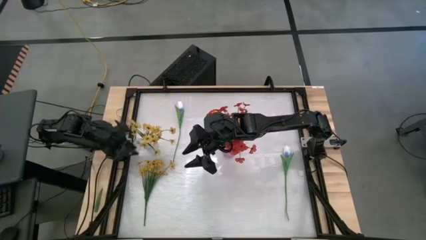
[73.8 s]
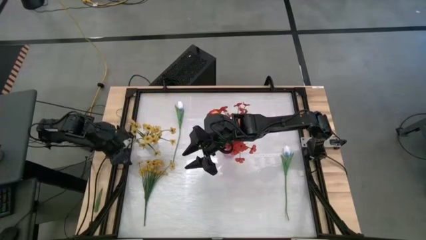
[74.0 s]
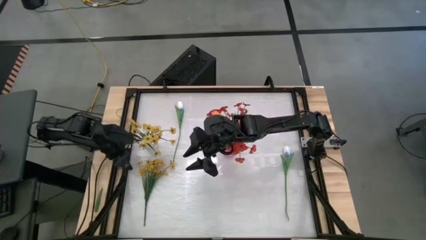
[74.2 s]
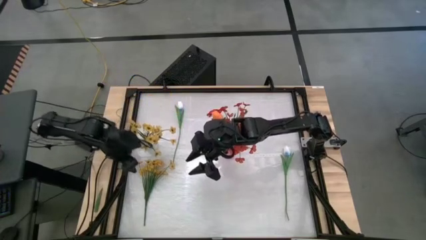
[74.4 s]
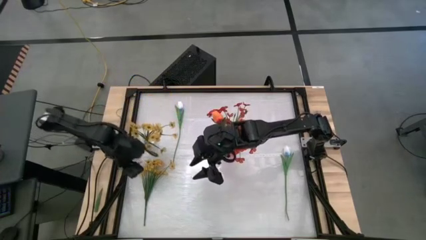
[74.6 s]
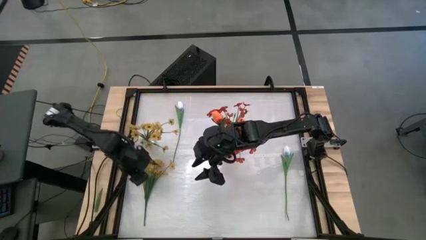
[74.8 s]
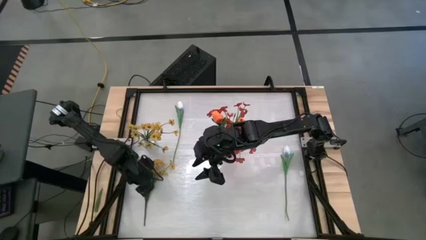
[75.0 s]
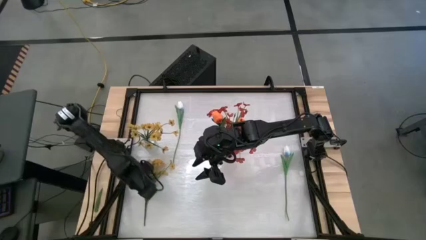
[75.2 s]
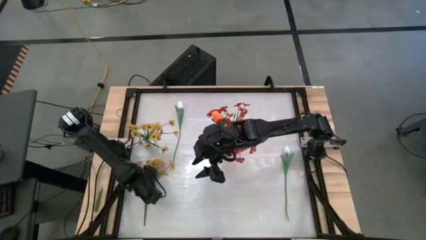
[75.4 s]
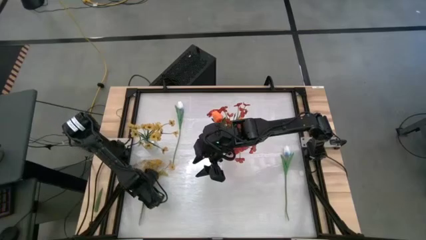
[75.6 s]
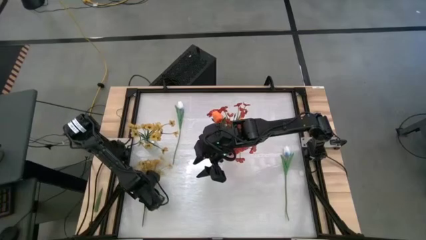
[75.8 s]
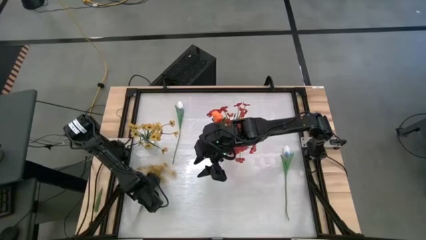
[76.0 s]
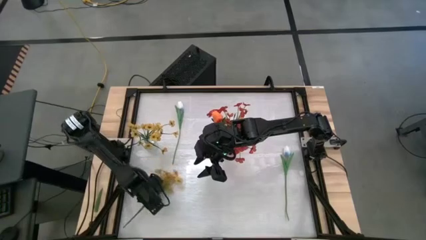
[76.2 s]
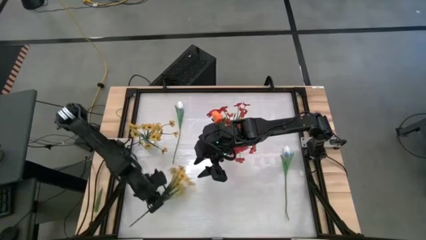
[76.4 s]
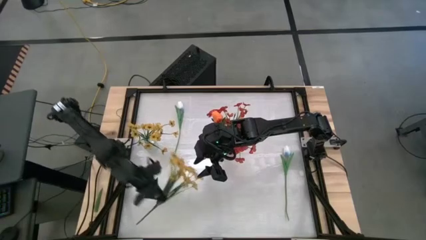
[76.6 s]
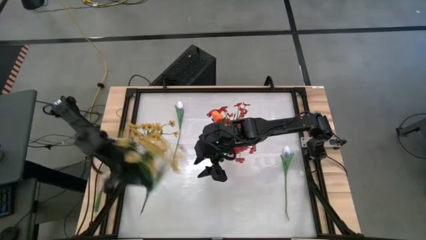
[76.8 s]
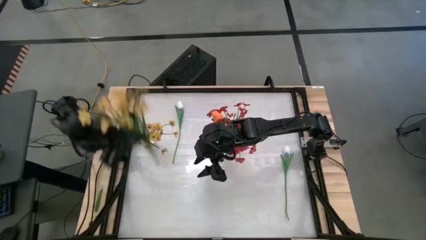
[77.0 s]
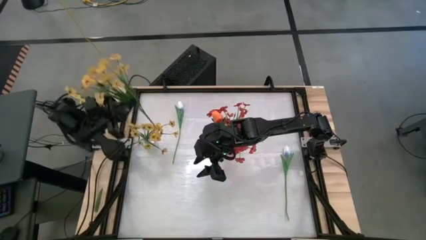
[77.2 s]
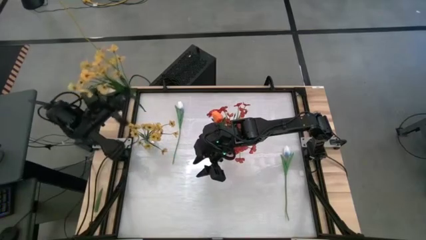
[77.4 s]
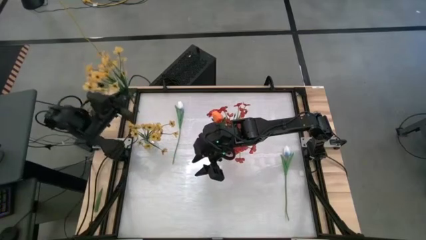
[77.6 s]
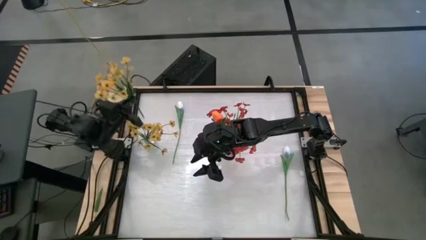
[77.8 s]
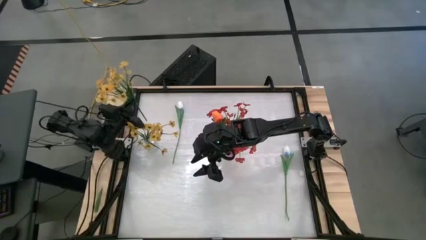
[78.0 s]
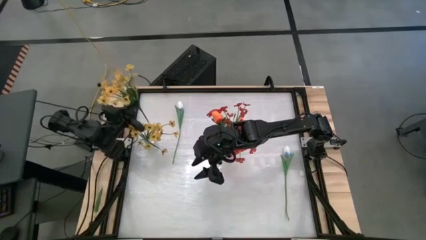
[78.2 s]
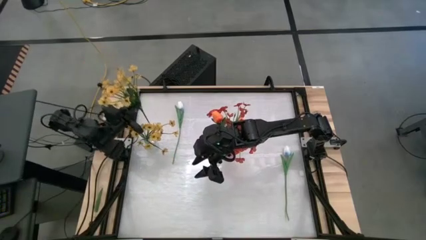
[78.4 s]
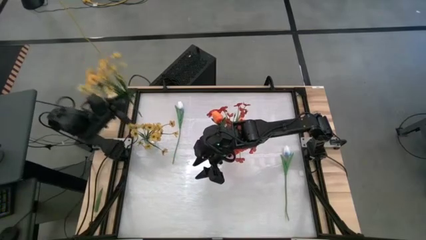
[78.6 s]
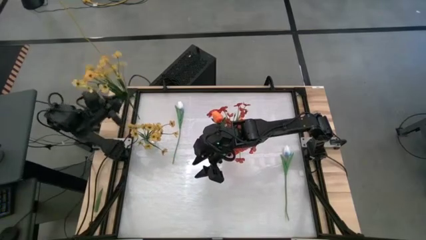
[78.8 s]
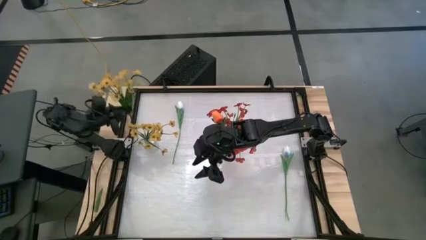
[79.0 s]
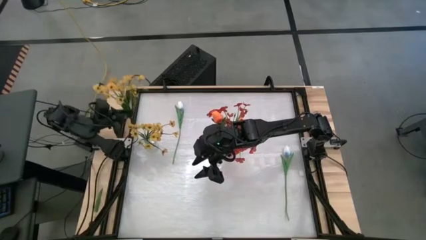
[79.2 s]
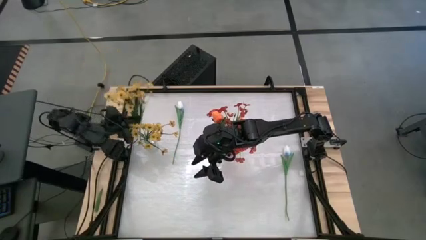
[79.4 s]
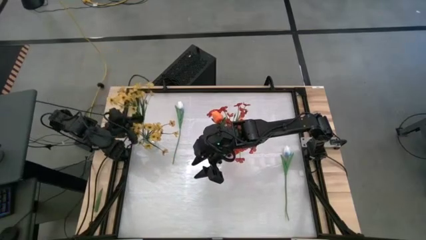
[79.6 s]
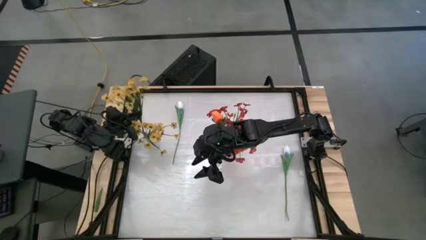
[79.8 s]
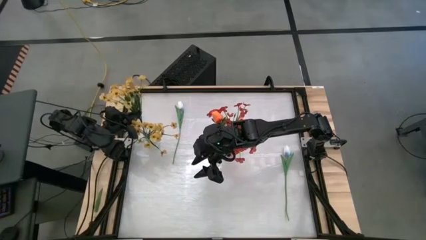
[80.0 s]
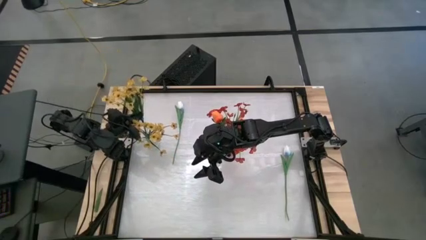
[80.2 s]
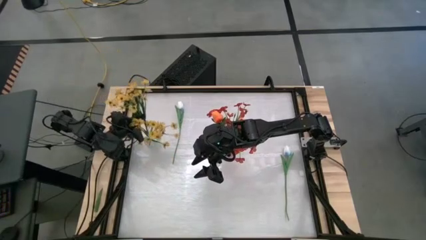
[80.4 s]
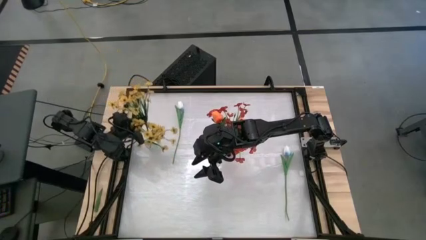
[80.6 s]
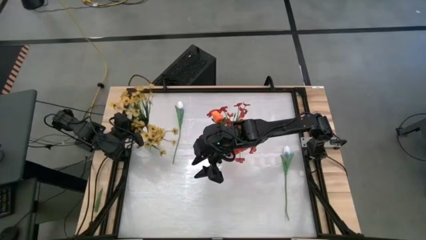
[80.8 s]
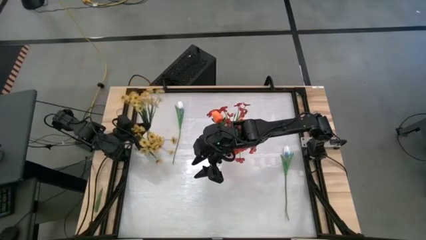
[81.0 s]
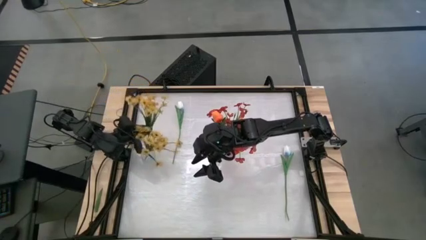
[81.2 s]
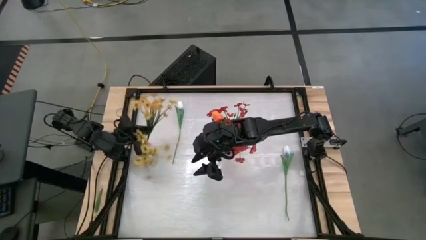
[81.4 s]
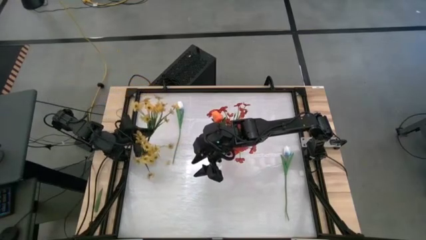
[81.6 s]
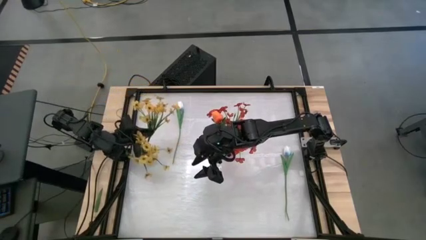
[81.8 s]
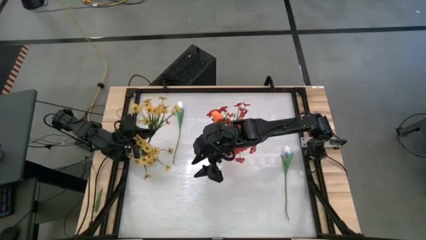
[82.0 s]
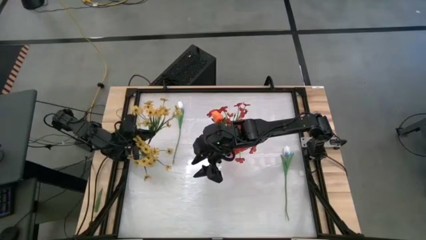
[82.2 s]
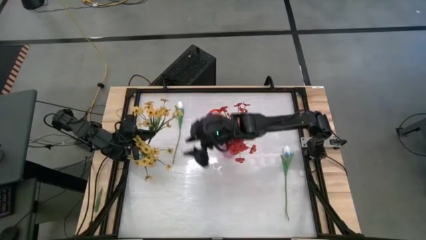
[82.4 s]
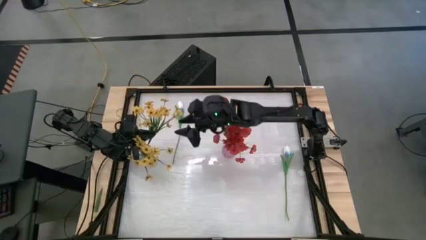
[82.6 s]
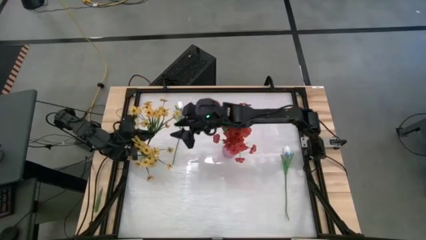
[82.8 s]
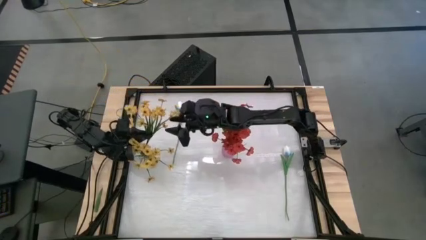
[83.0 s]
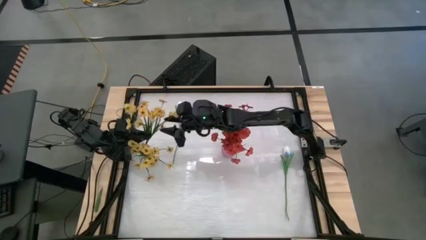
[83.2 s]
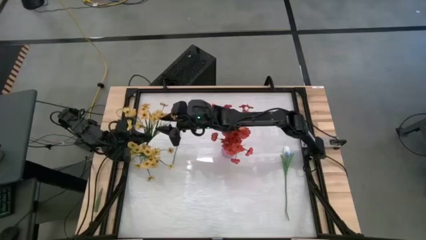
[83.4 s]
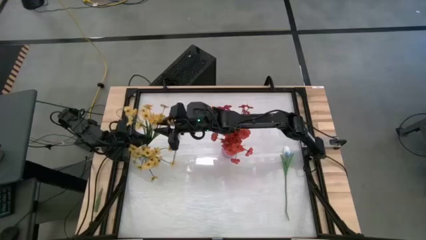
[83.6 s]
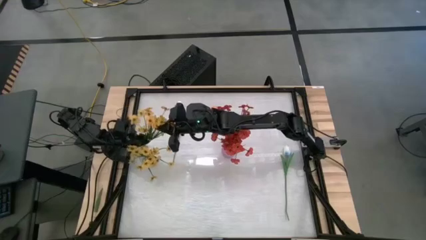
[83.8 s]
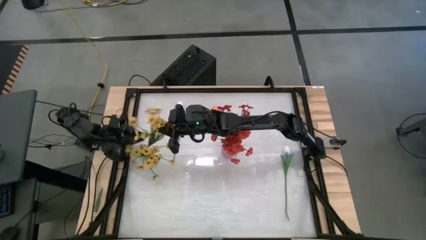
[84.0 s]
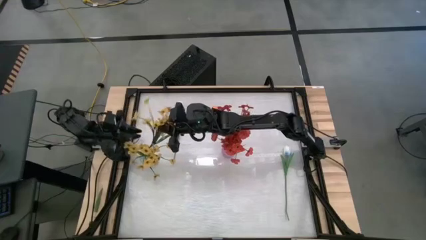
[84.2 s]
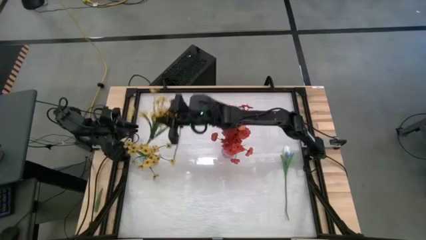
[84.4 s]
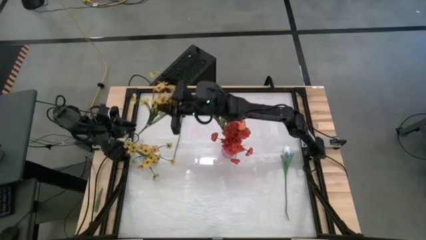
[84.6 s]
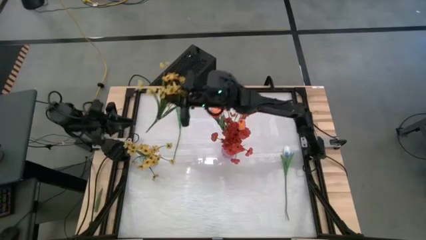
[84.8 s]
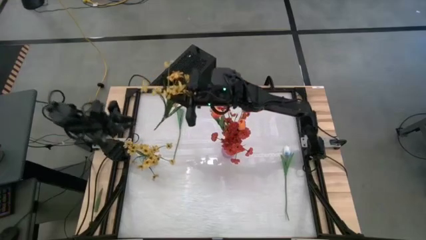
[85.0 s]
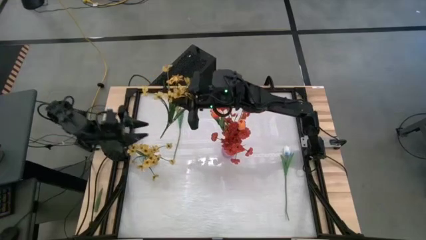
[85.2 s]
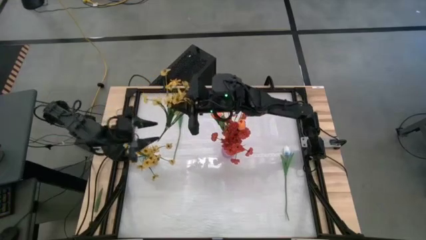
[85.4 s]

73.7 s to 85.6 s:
Task: Sort flowers into vase by color
Put the yellow flowers into the transparent vase

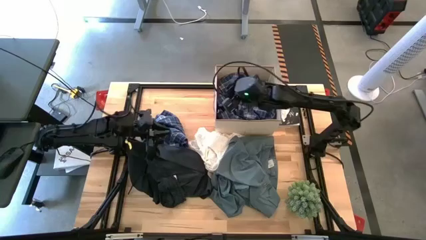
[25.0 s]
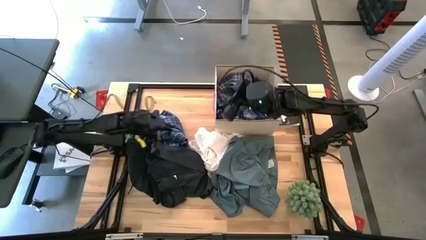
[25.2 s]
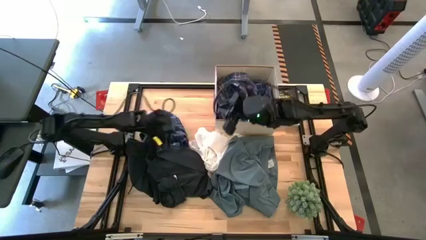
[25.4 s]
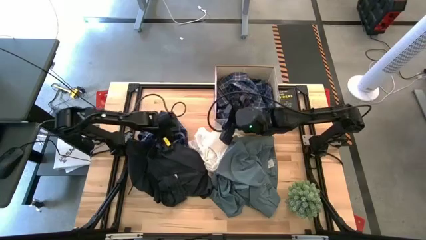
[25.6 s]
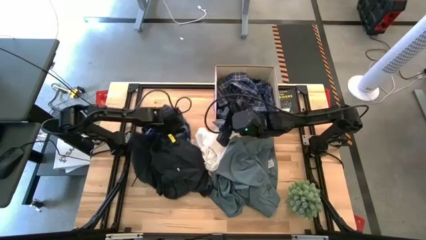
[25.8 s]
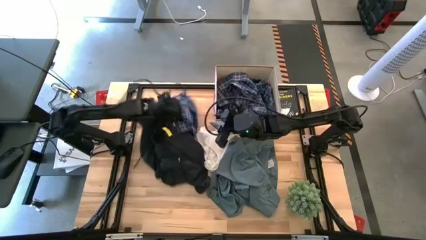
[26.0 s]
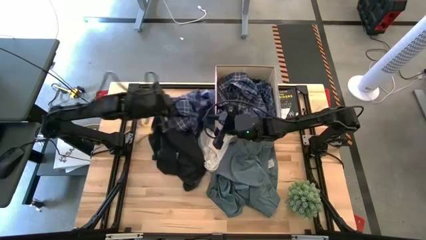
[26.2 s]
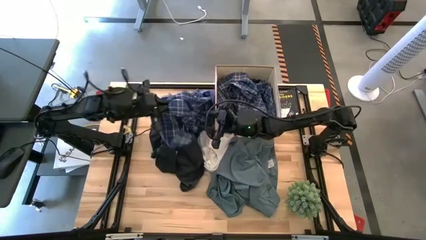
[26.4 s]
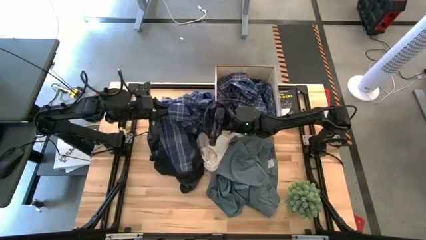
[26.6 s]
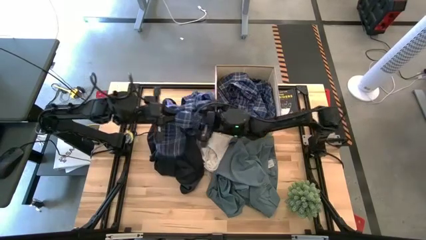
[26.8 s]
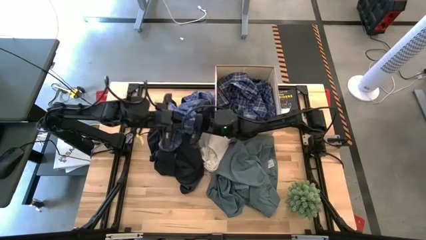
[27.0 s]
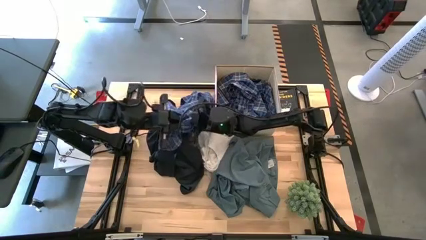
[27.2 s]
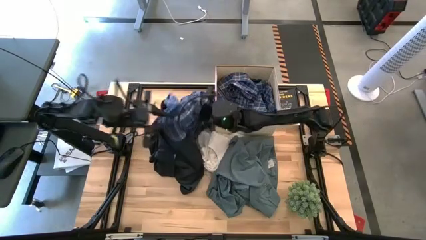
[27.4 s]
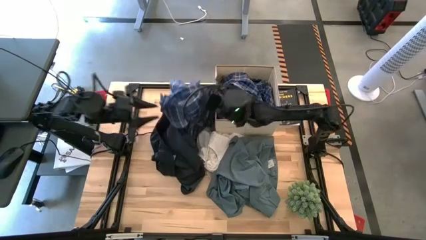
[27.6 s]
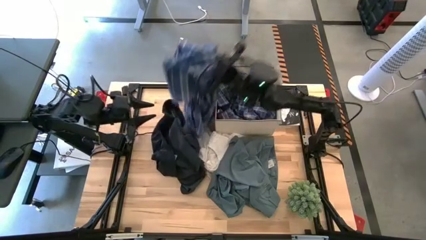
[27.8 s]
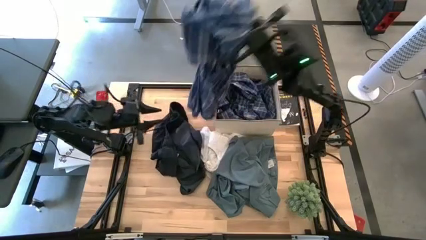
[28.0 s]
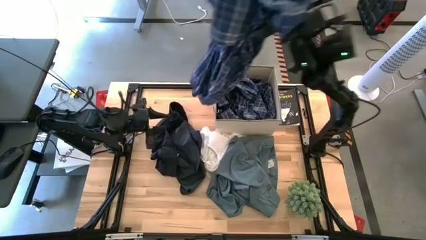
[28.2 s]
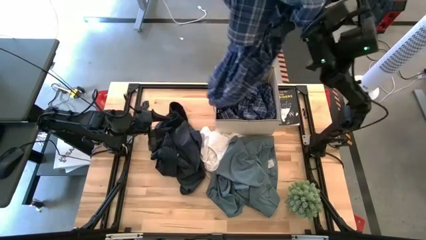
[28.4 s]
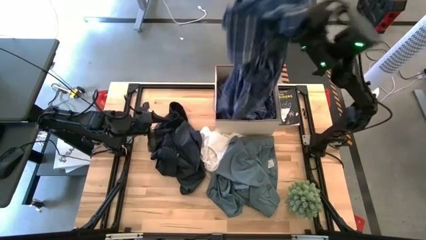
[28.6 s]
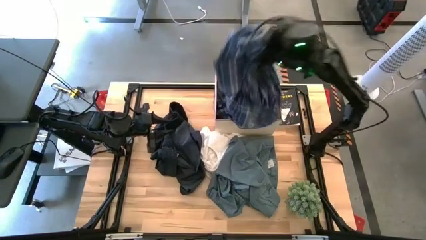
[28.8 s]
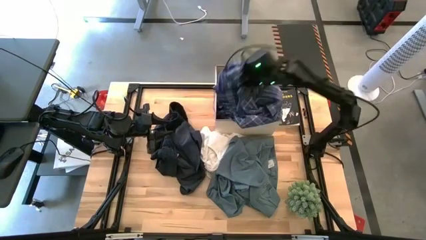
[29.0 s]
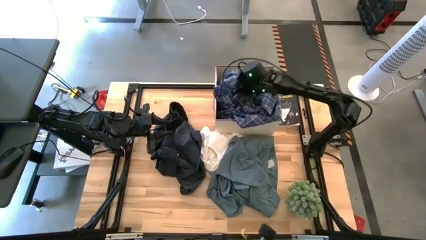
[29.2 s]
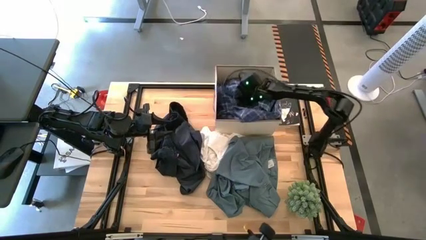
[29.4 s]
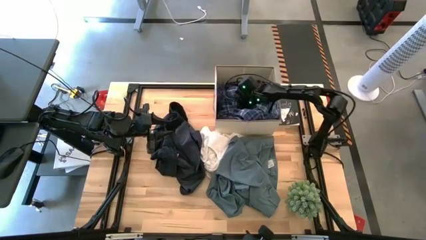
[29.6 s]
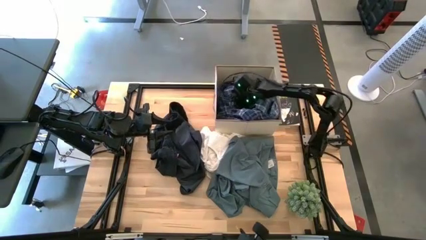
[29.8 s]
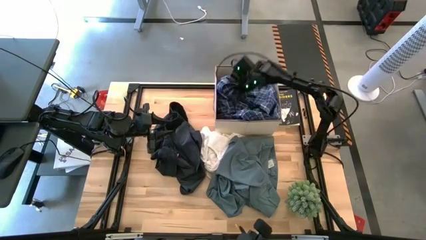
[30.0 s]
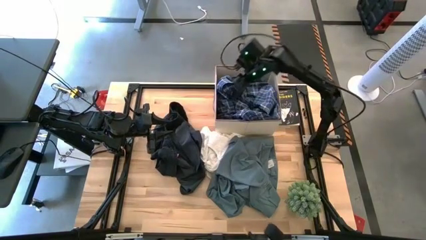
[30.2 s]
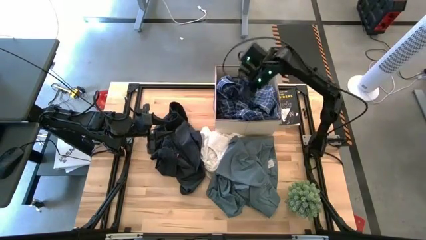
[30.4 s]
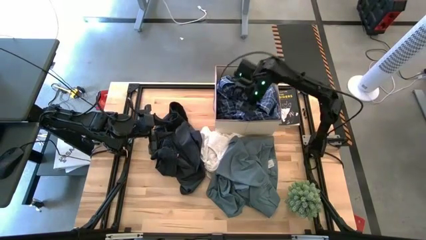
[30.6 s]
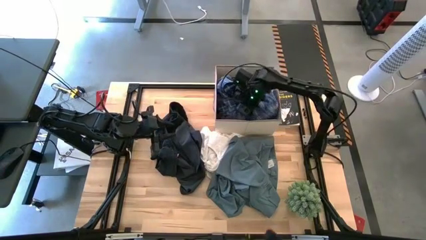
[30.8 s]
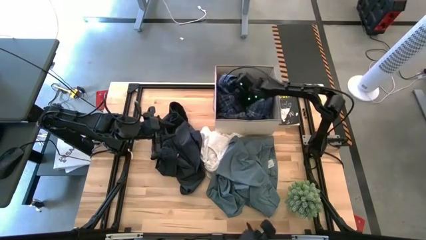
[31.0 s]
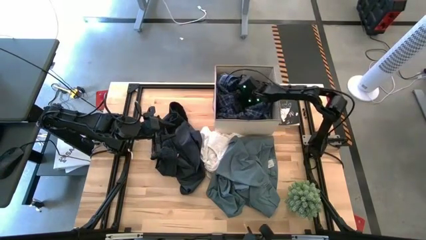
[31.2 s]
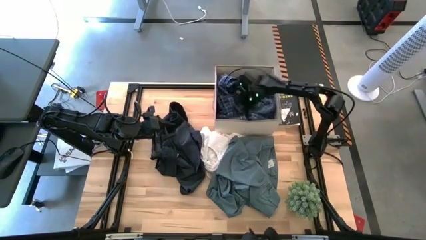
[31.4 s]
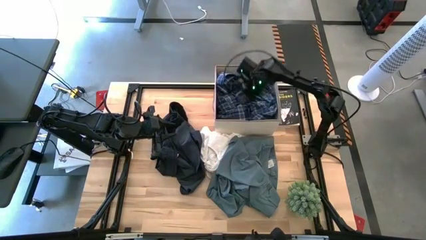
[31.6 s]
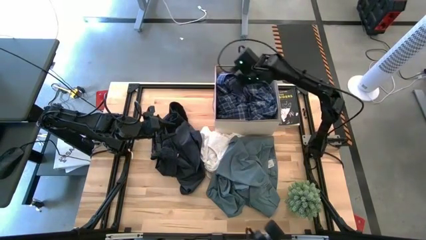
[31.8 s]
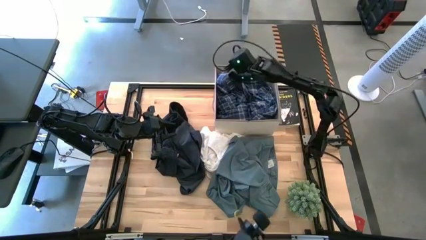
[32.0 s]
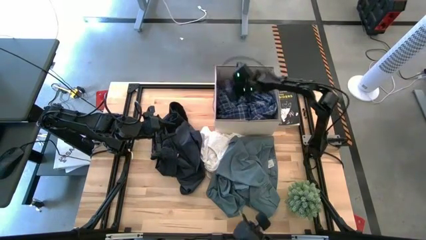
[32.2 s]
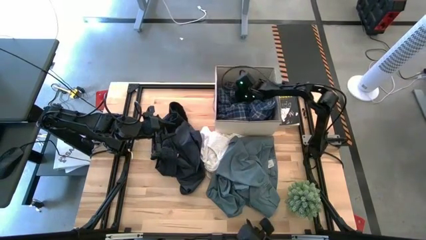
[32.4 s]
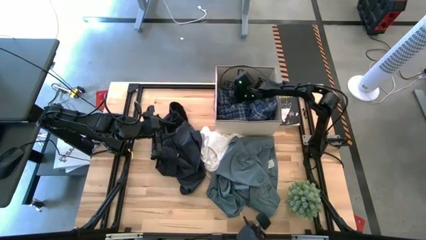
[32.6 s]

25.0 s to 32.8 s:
Task: Sort clothes
Put the blue patterned sleeve into the laundry organizer
